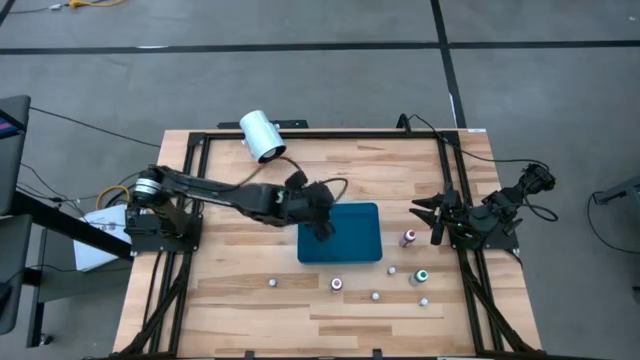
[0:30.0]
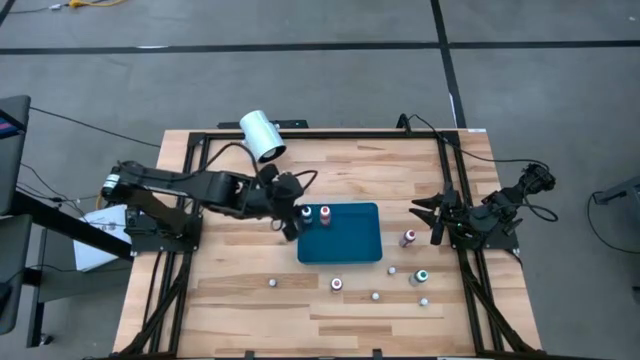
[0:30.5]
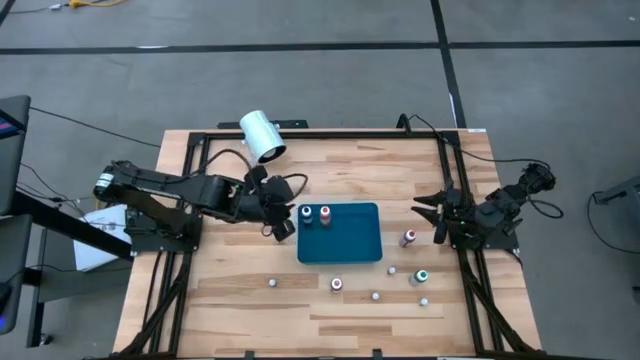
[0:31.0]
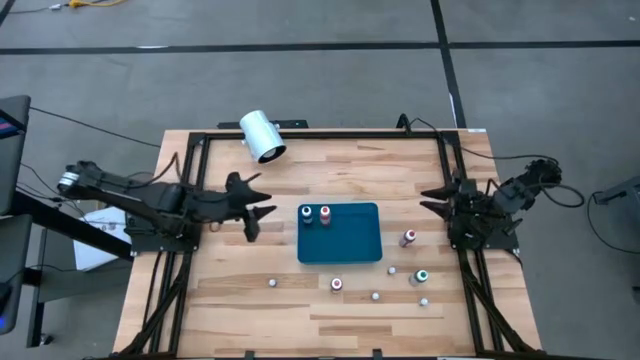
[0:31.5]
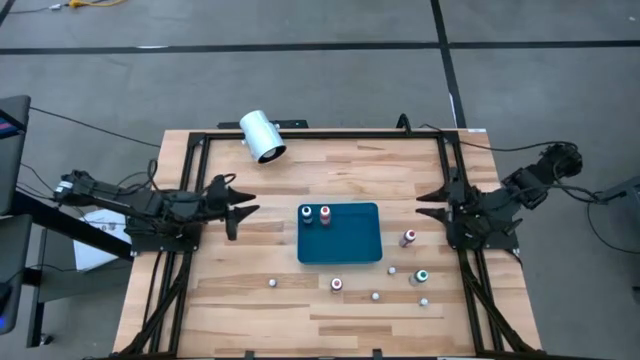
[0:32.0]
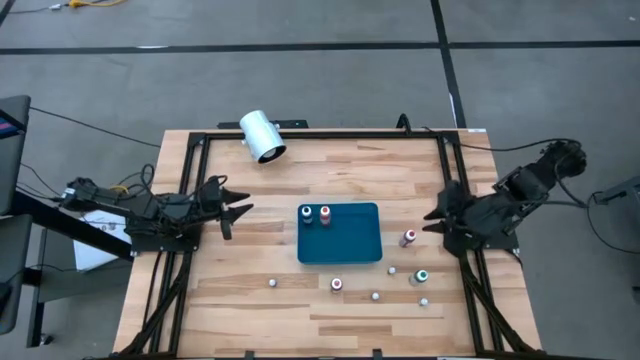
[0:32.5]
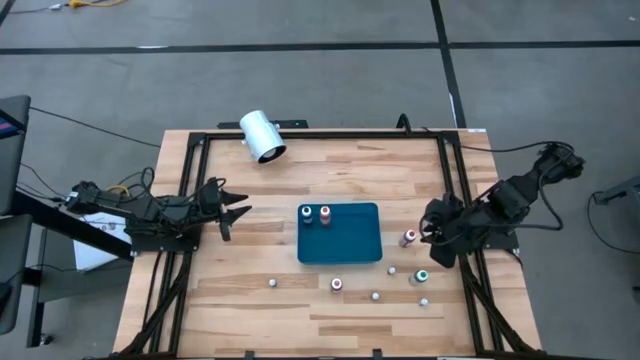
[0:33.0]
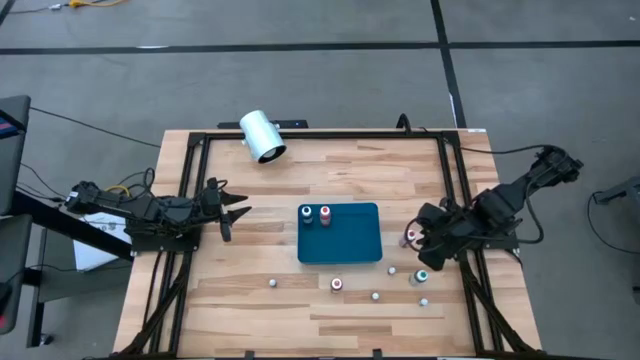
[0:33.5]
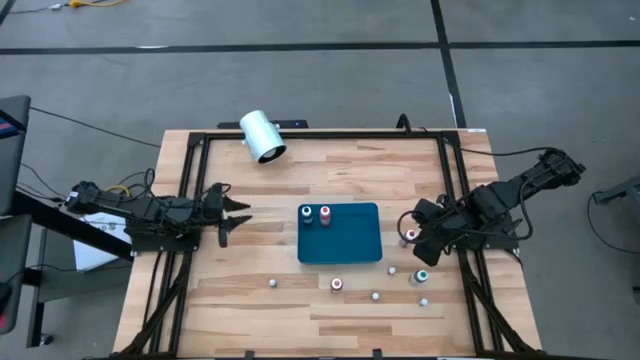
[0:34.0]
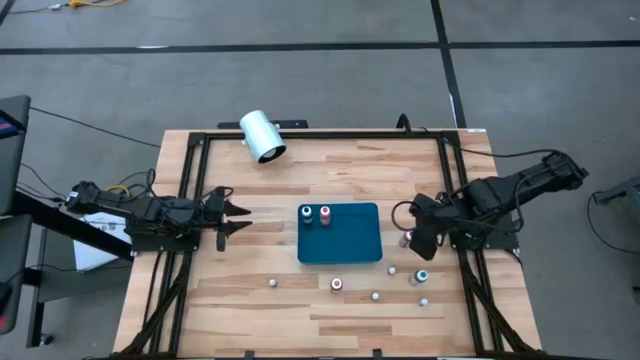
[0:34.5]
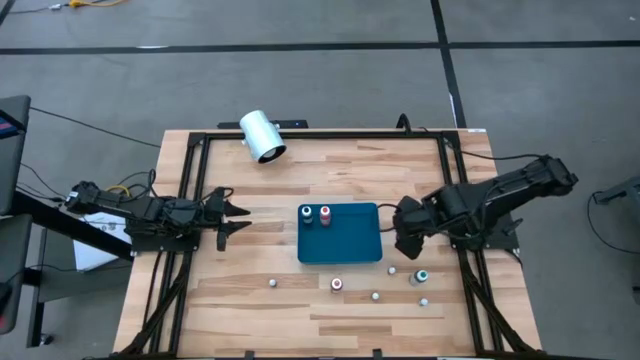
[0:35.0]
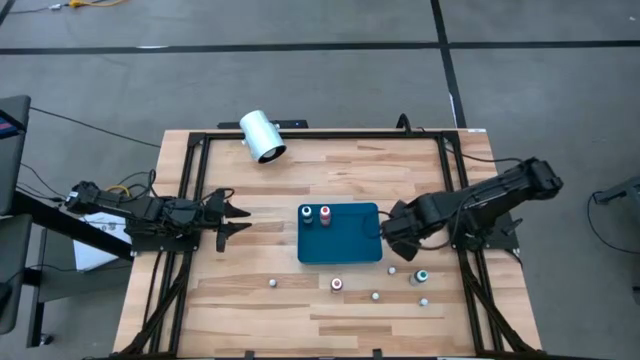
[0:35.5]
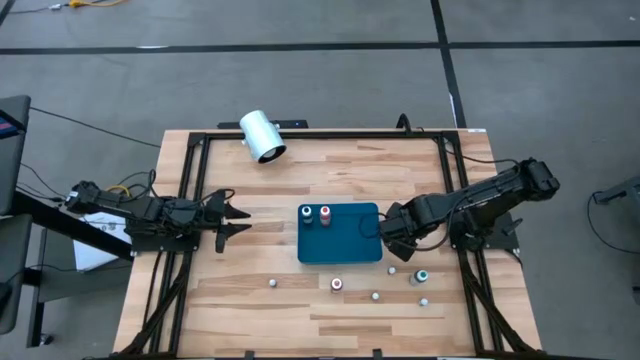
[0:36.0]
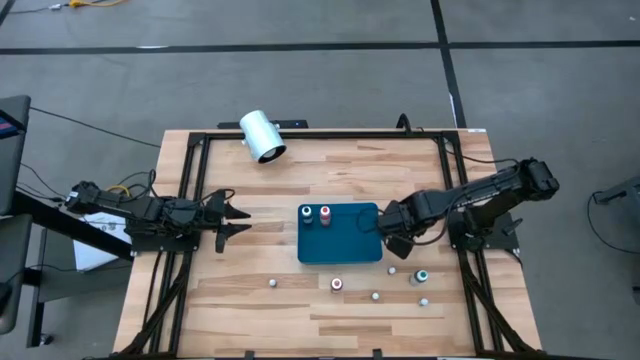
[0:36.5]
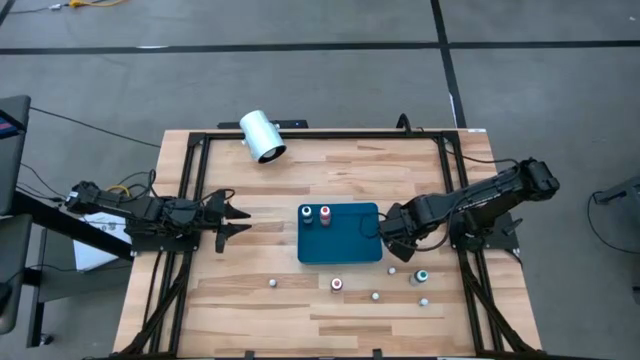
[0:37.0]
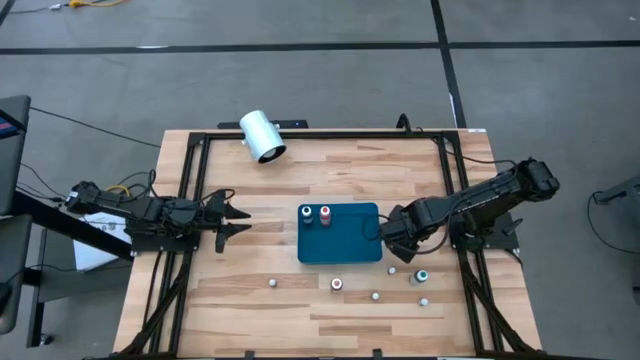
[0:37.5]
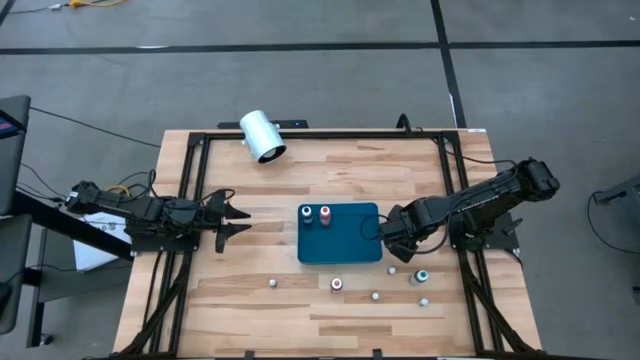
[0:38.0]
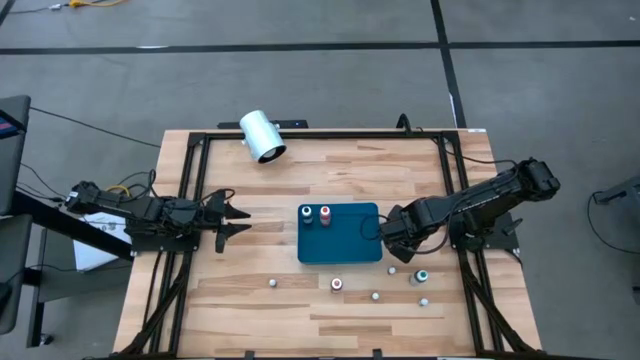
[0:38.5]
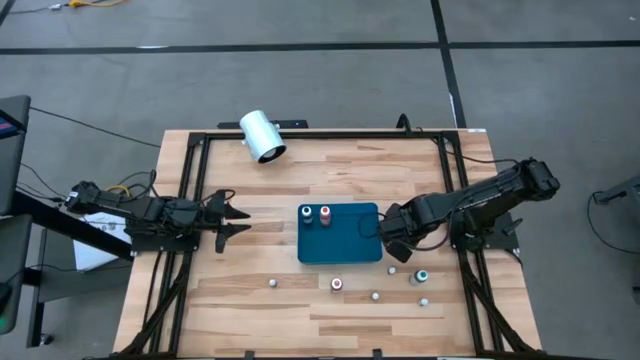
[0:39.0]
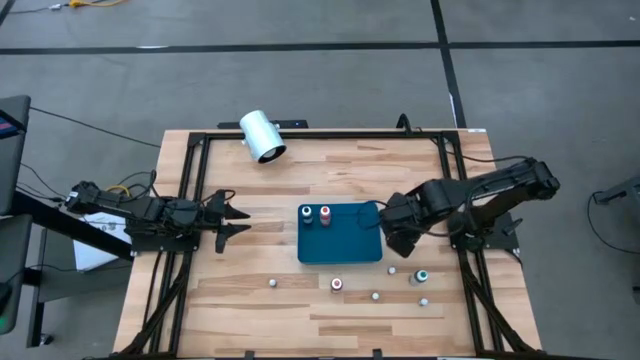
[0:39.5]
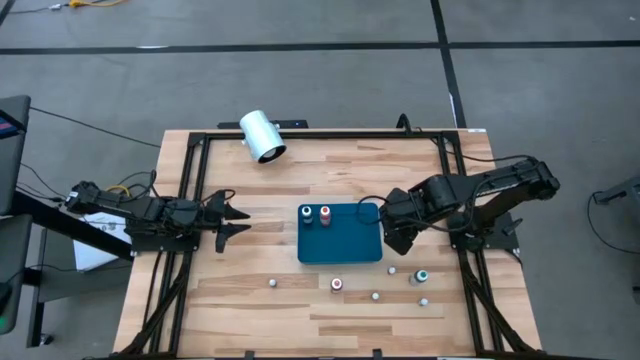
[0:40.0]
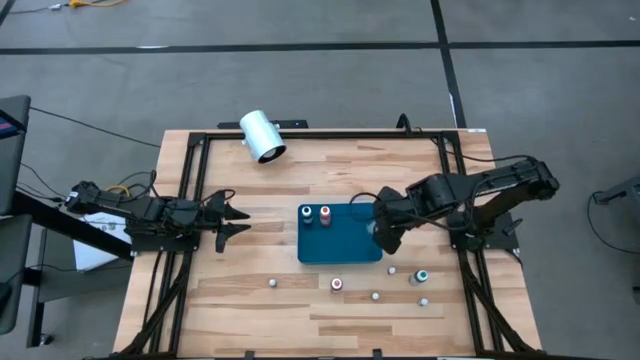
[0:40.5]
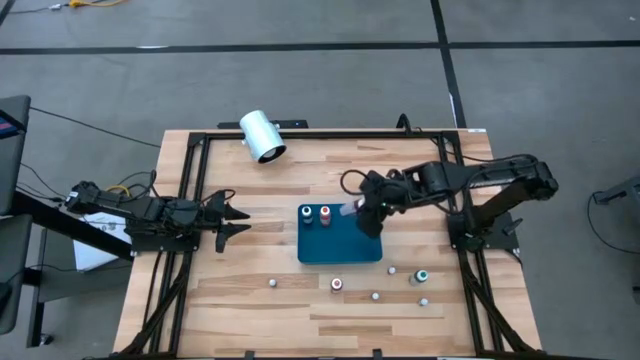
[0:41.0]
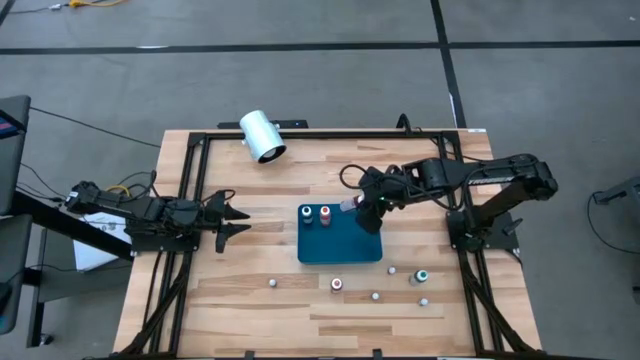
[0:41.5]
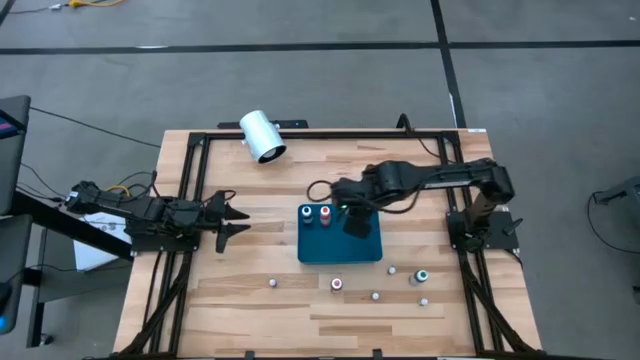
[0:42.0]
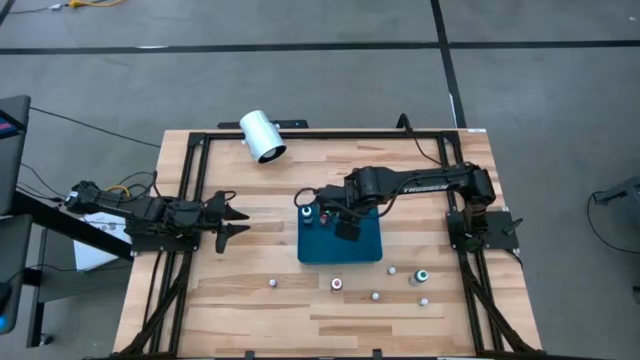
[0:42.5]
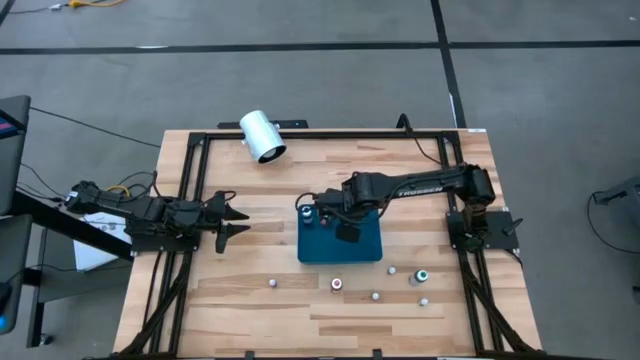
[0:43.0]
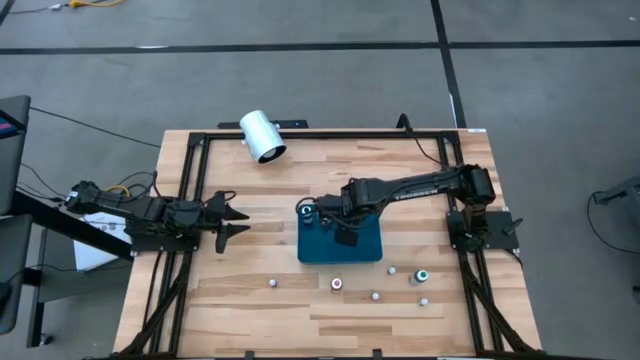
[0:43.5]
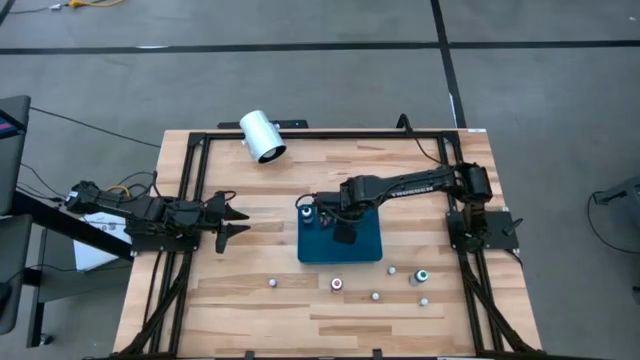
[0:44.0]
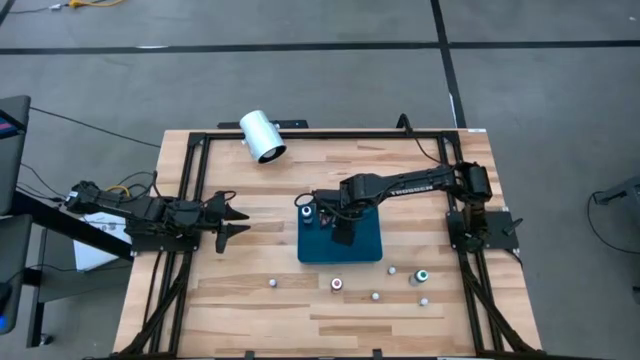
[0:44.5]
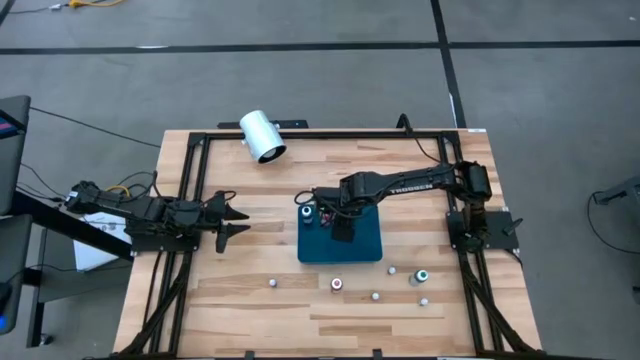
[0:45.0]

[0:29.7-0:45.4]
Task: Pick & Place food coloring
Put the large red food coloring bottle into the blue bin

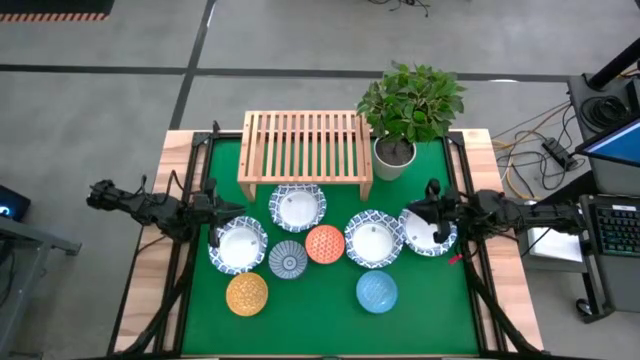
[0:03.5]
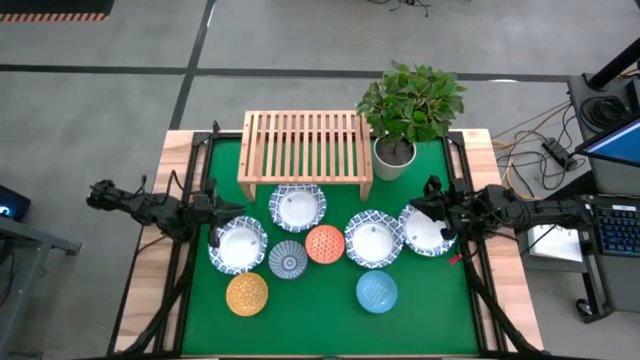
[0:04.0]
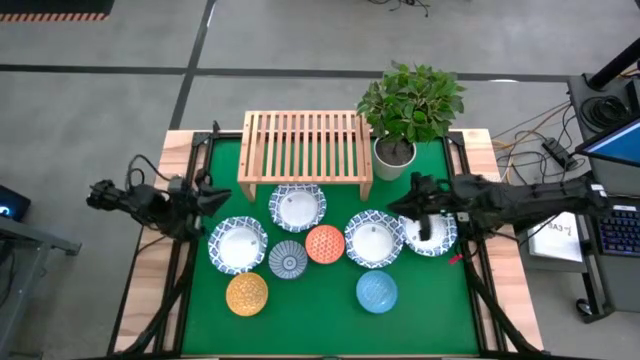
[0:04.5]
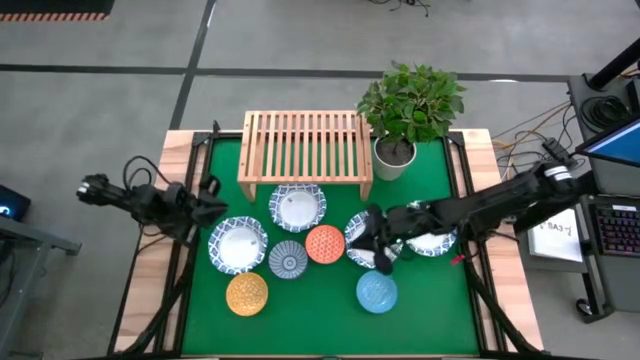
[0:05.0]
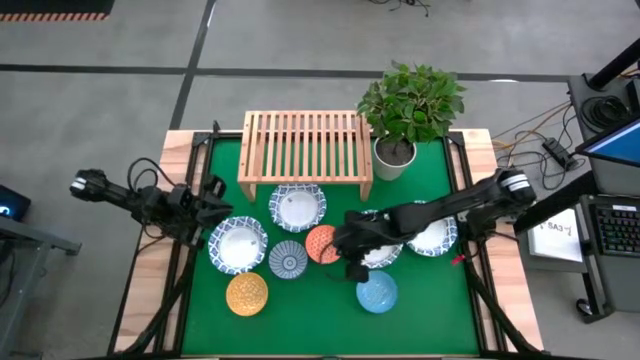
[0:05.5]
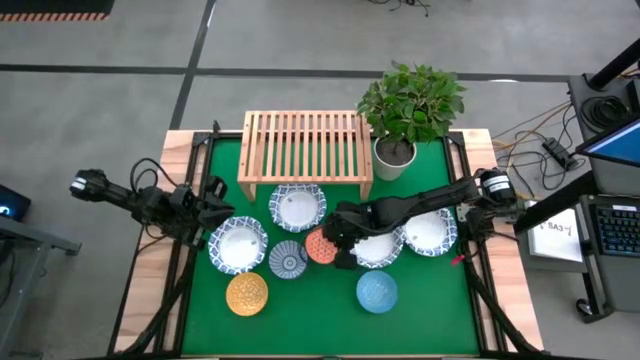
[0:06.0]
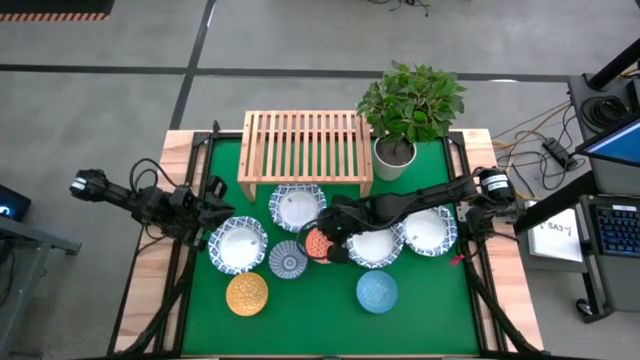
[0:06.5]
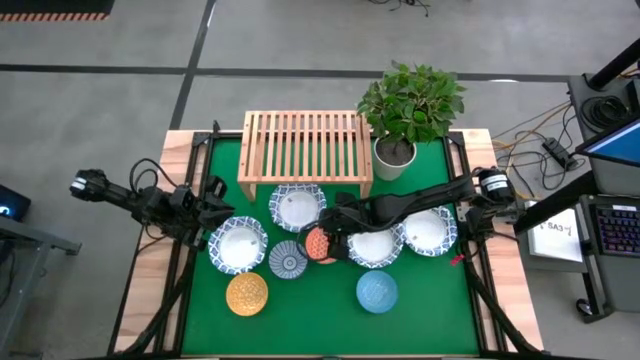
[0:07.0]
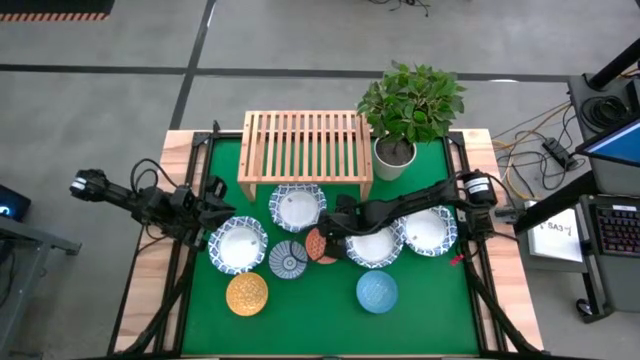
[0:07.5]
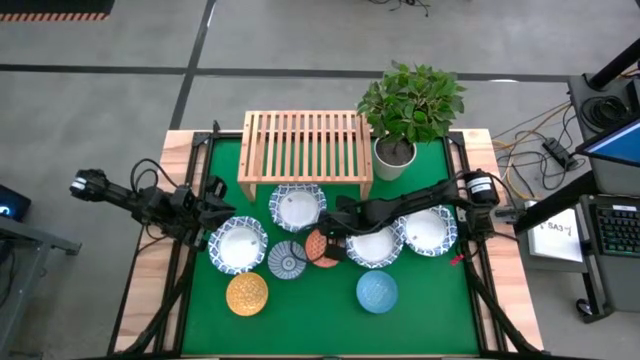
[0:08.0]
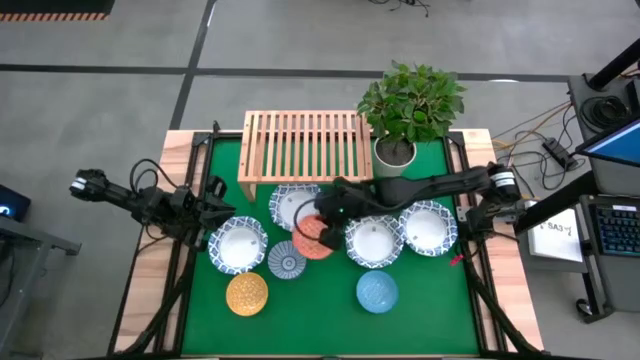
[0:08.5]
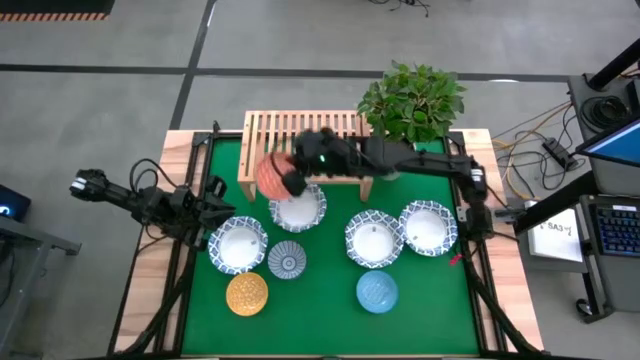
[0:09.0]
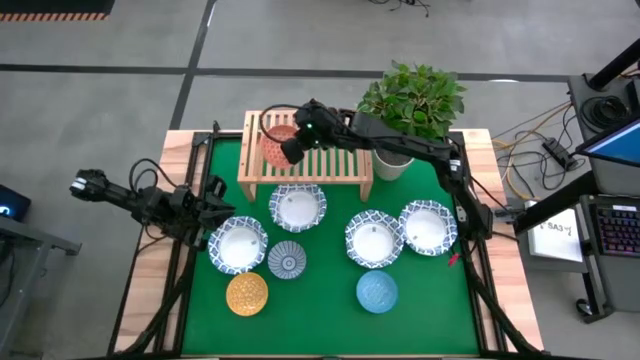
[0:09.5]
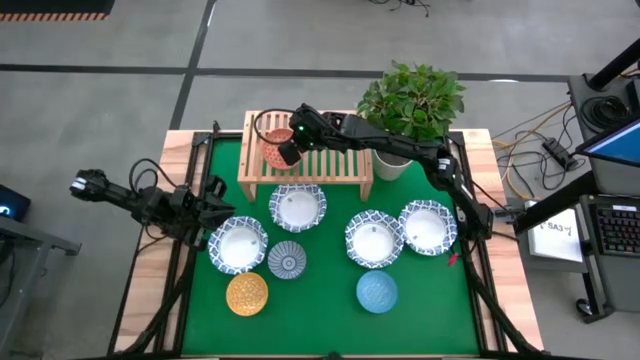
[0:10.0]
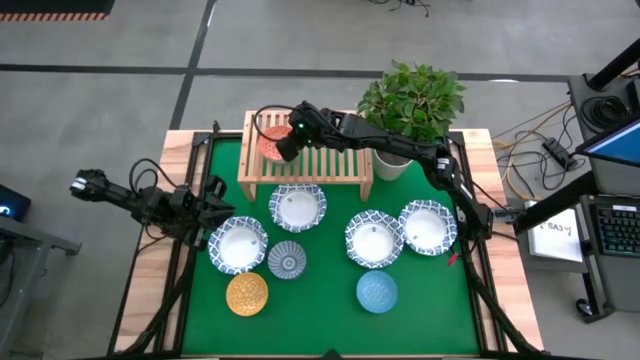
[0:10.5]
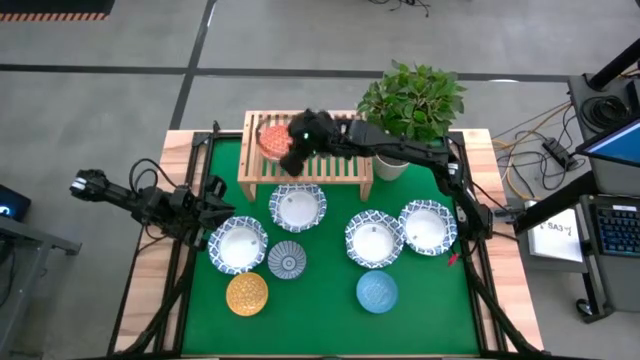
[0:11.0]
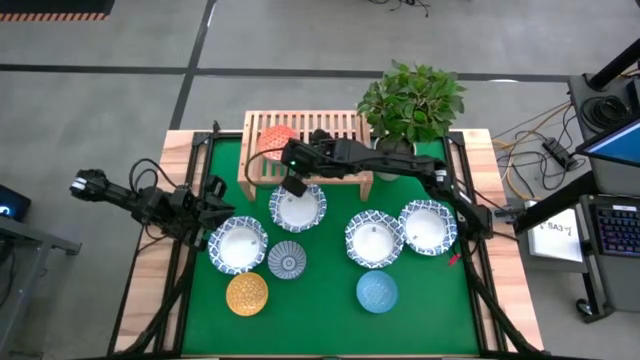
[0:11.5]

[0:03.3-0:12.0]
Task: Place and stack plates onto a shelf
Put the orange bowl on the left side of the shelf
